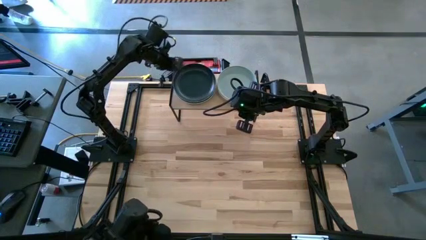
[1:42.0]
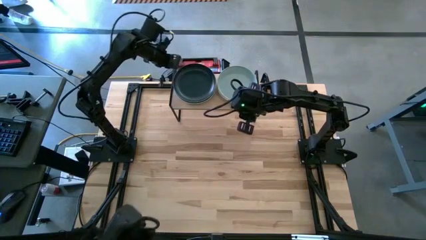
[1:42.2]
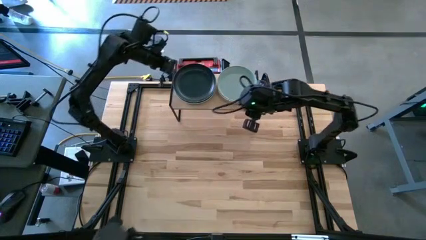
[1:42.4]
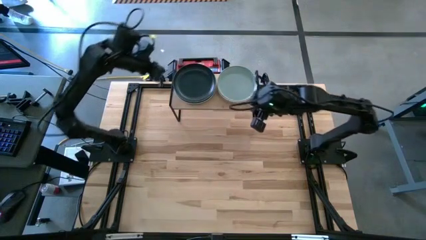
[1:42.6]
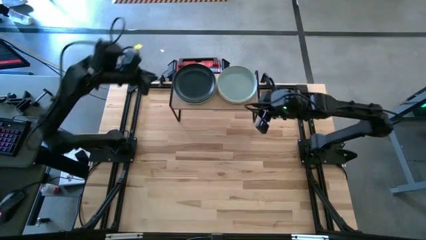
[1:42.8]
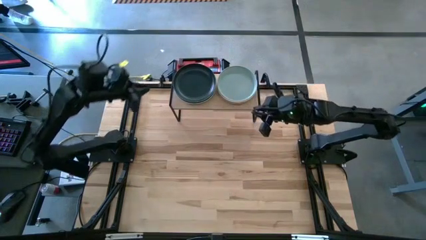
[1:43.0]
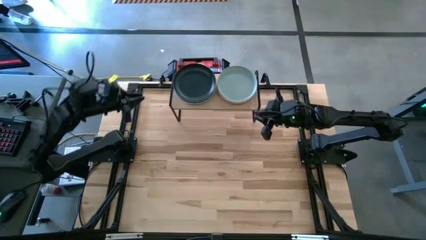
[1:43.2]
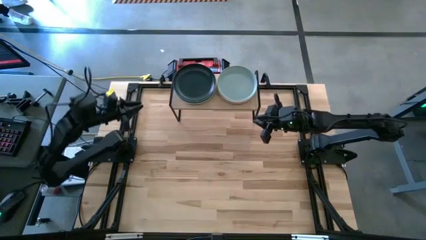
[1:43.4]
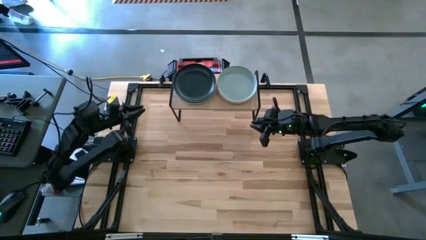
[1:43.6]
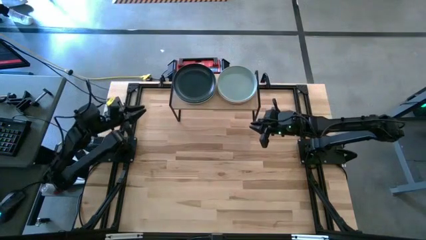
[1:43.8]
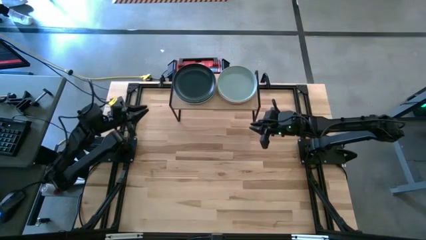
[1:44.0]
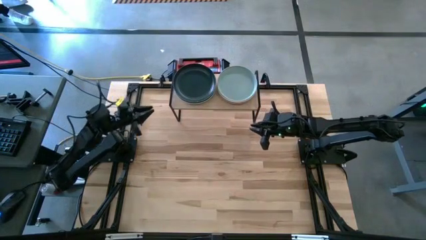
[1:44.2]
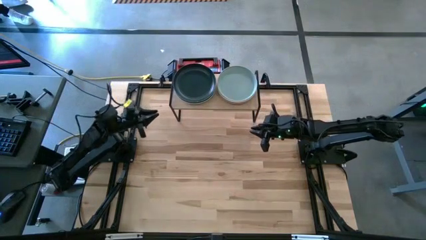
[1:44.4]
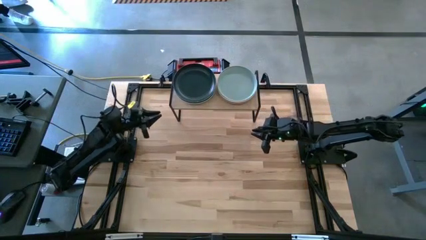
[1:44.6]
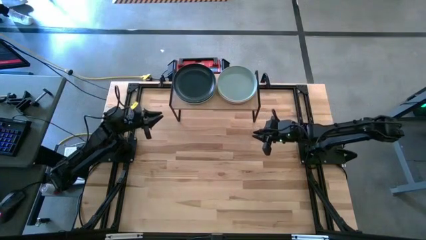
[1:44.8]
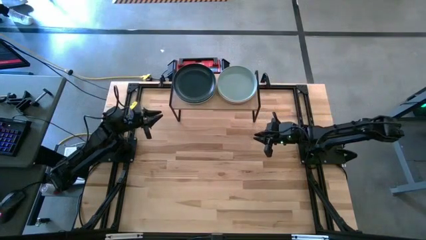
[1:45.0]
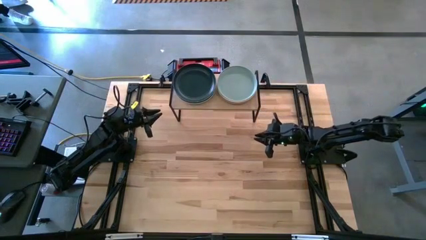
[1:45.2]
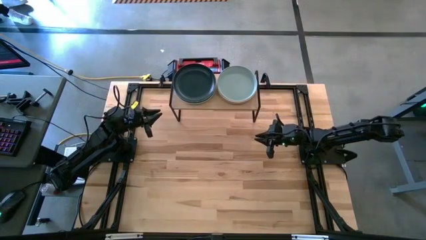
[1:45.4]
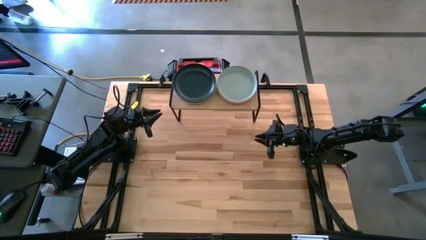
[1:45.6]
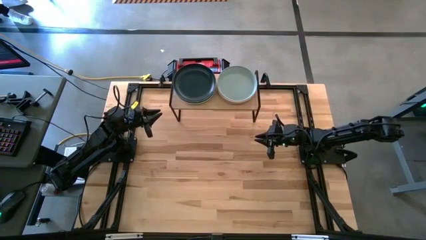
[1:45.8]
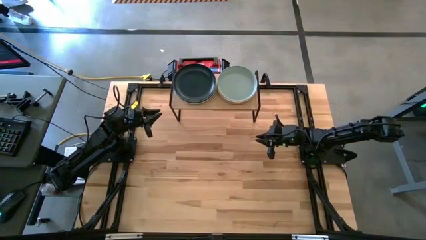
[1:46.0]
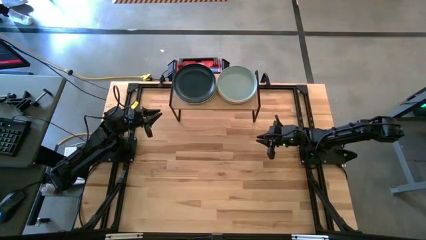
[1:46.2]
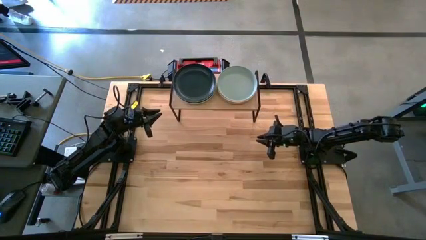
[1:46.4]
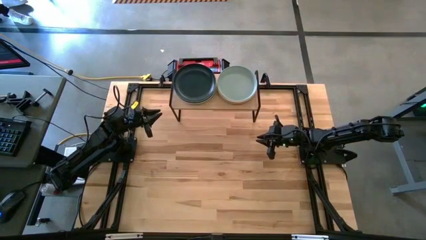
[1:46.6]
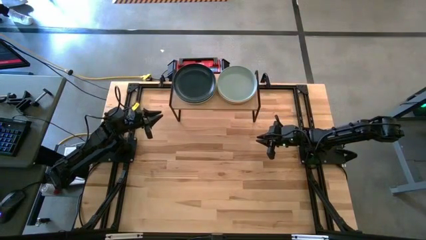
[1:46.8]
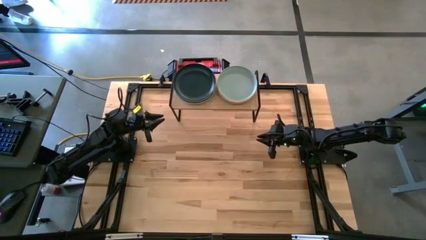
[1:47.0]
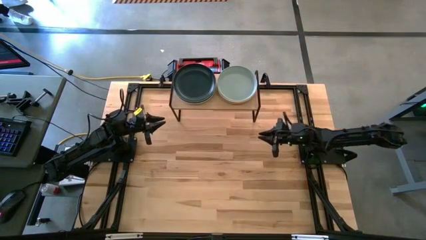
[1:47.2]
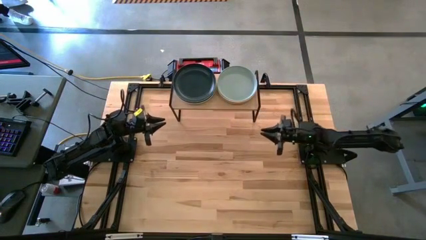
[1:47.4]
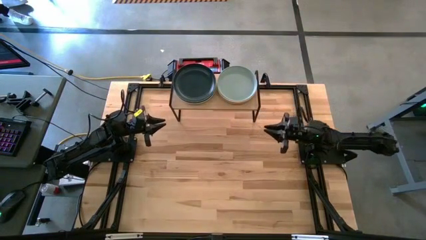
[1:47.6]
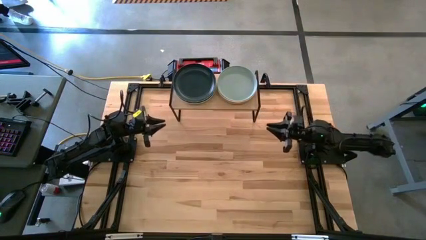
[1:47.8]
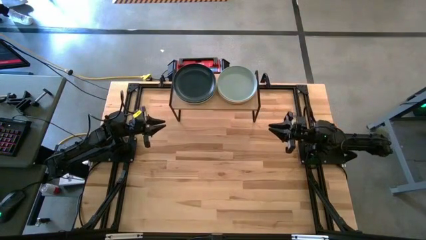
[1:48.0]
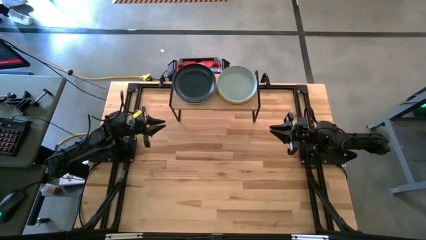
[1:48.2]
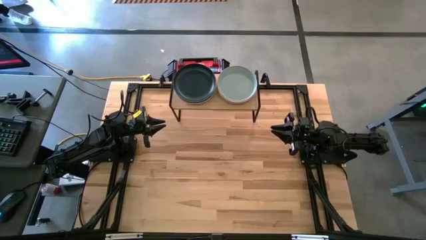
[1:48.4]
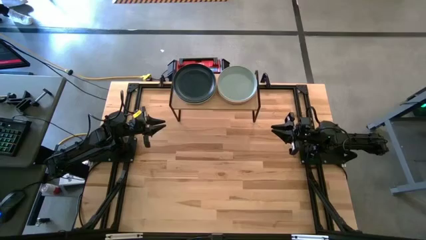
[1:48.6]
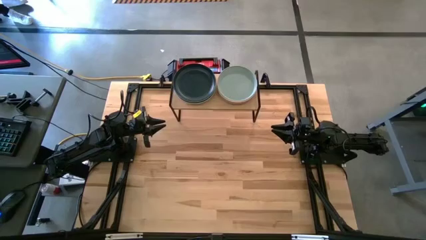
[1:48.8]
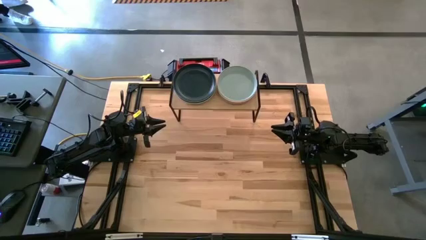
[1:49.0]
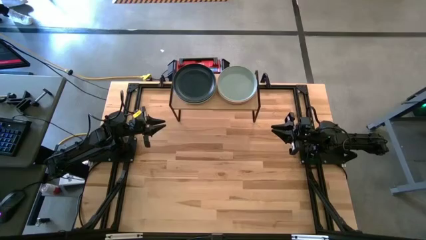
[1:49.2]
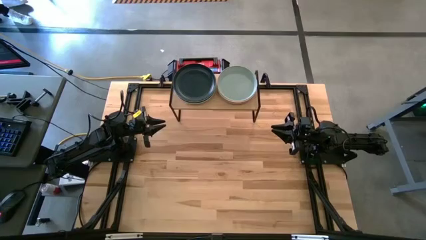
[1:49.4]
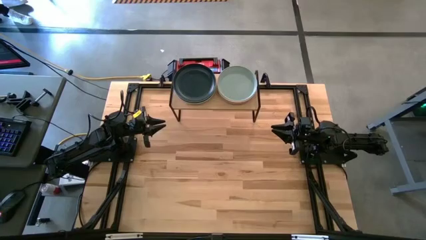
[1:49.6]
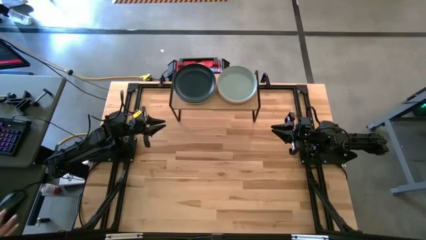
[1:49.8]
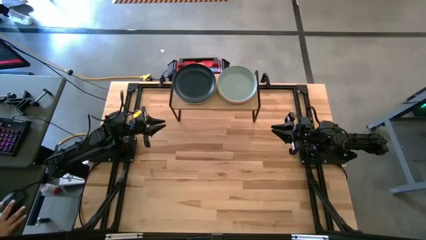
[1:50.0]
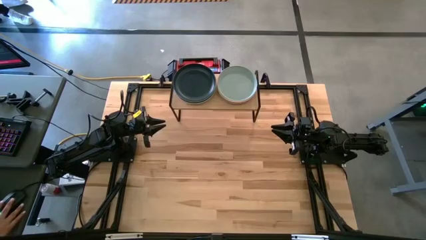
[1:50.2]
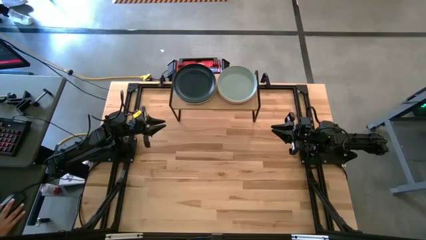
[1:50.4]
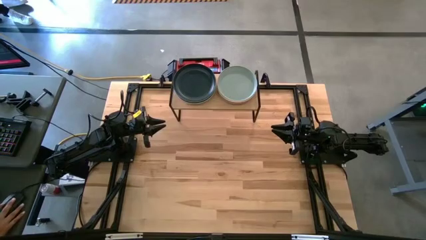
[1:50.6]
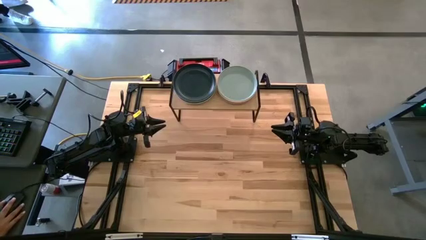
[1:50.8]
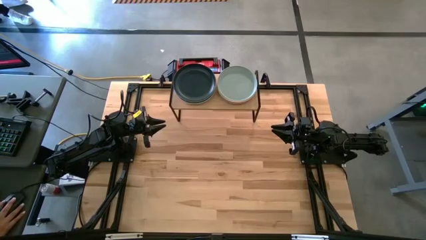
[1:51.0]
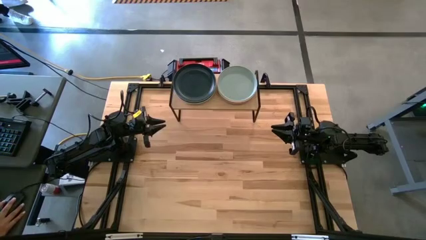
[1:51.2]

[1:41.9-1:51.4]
Task: Place and stack plates onto a shelf
Return to Home Position

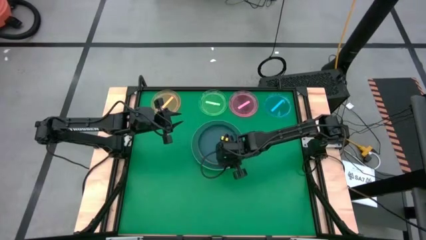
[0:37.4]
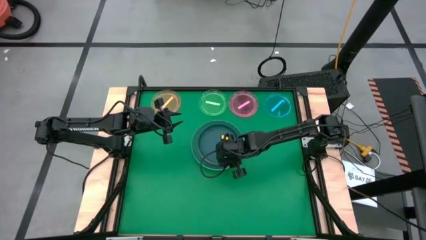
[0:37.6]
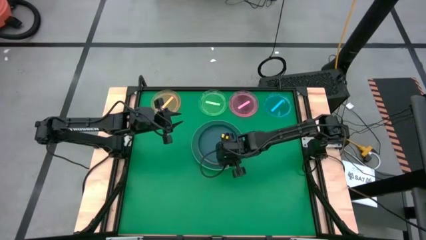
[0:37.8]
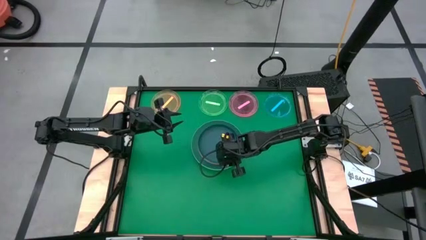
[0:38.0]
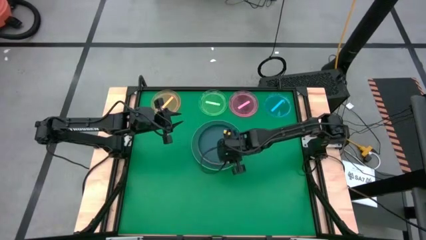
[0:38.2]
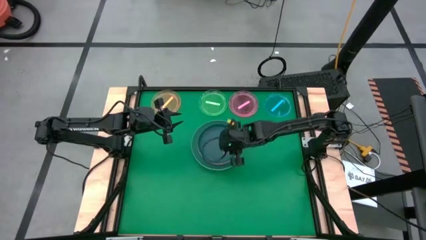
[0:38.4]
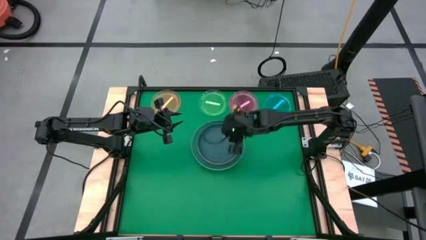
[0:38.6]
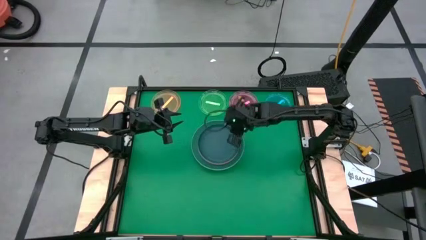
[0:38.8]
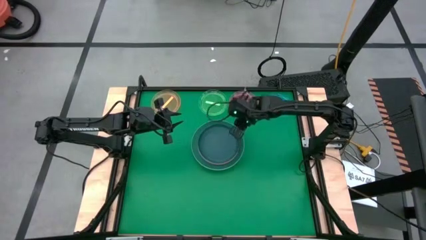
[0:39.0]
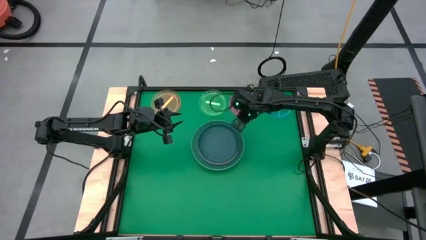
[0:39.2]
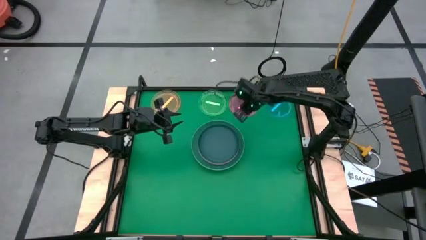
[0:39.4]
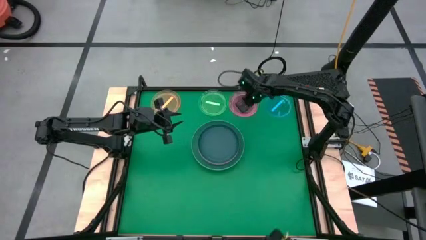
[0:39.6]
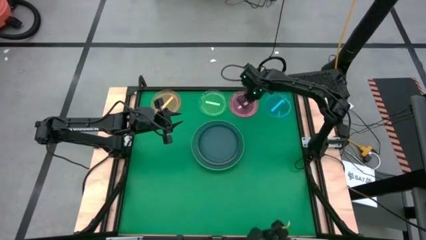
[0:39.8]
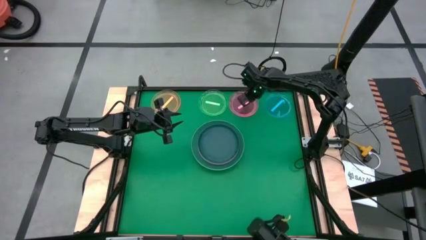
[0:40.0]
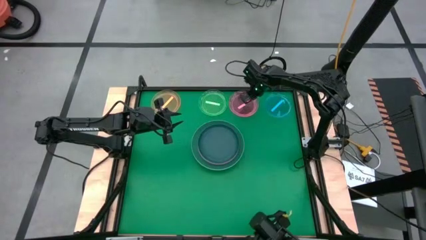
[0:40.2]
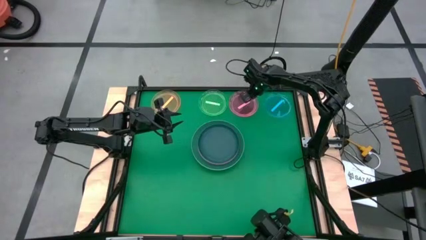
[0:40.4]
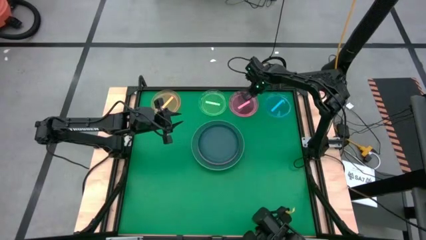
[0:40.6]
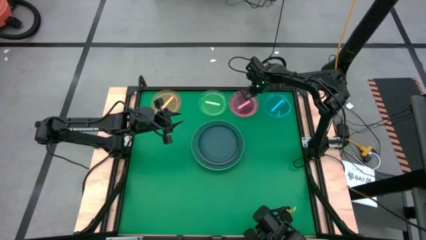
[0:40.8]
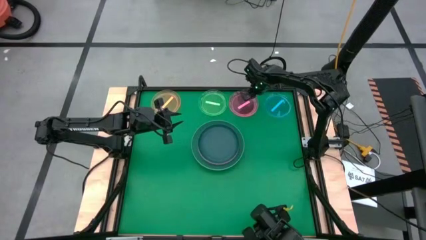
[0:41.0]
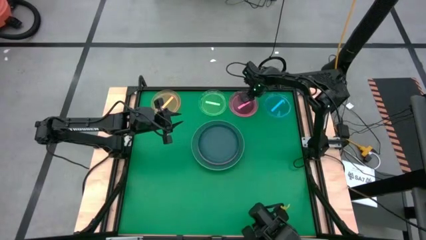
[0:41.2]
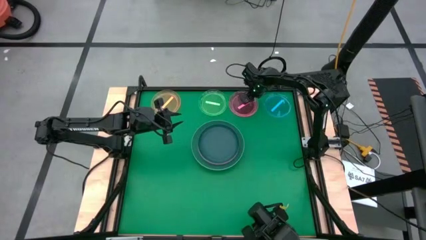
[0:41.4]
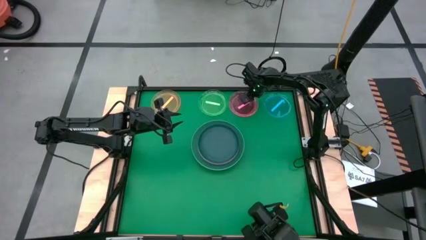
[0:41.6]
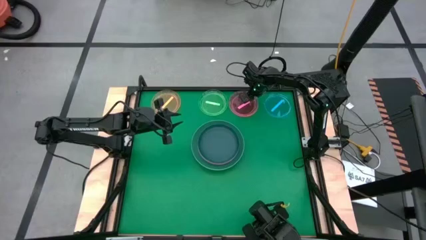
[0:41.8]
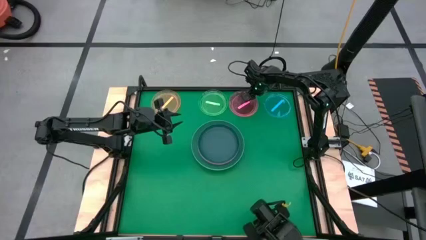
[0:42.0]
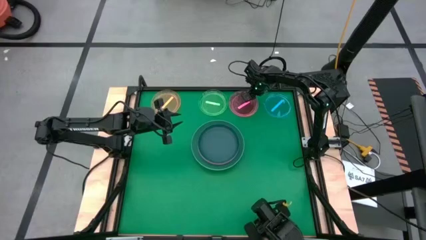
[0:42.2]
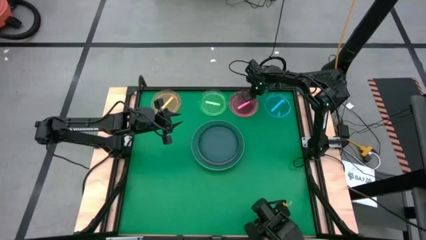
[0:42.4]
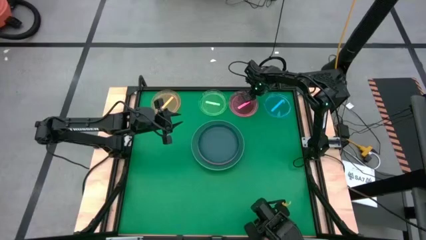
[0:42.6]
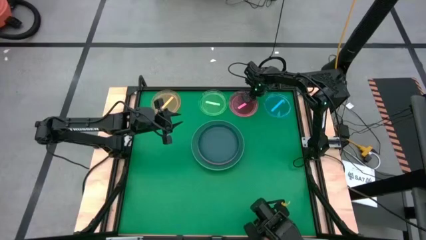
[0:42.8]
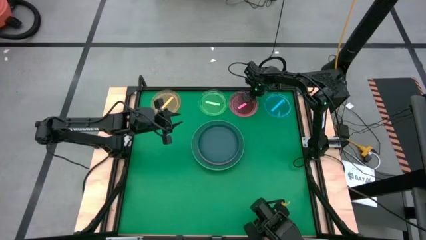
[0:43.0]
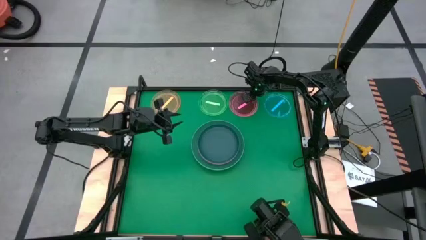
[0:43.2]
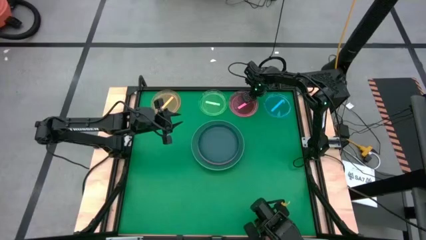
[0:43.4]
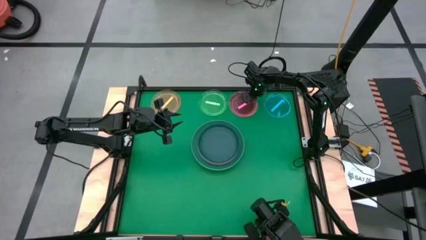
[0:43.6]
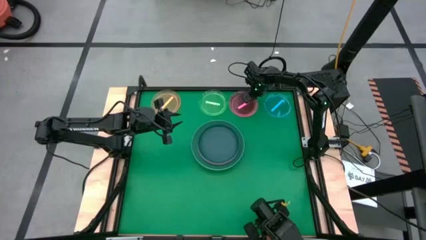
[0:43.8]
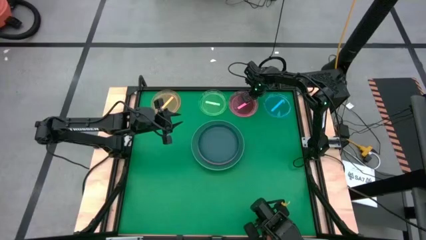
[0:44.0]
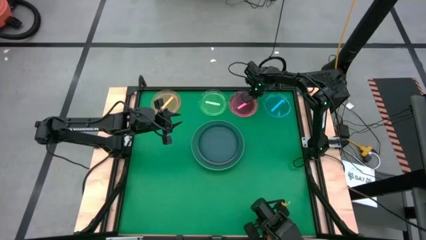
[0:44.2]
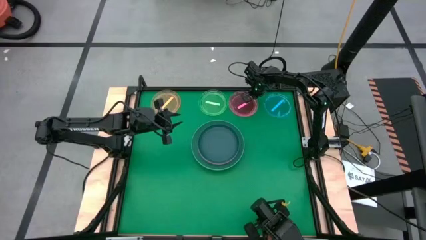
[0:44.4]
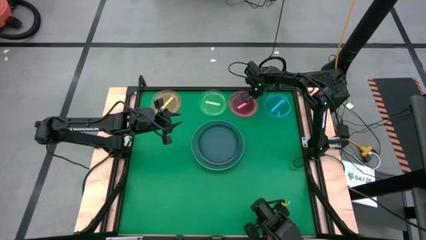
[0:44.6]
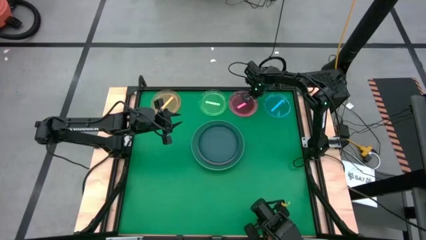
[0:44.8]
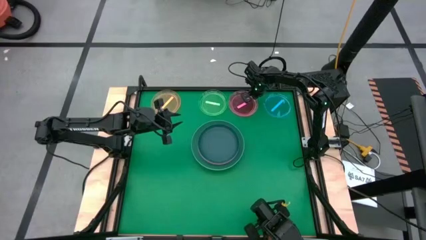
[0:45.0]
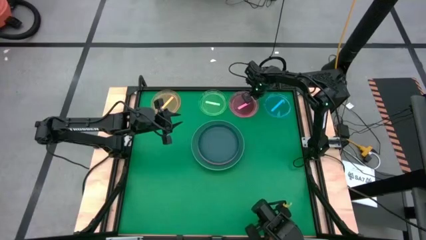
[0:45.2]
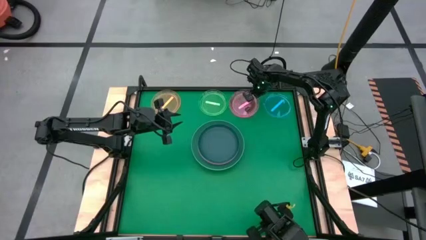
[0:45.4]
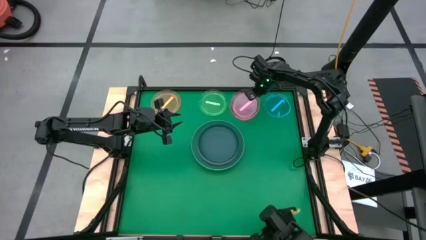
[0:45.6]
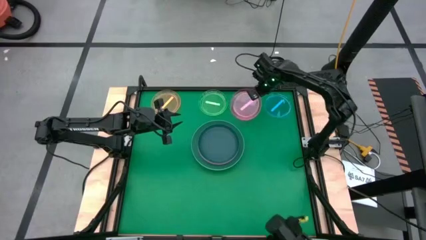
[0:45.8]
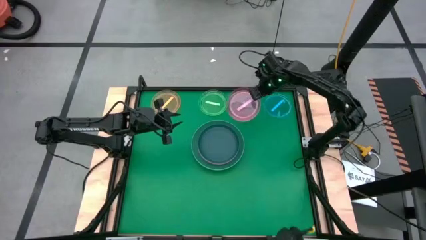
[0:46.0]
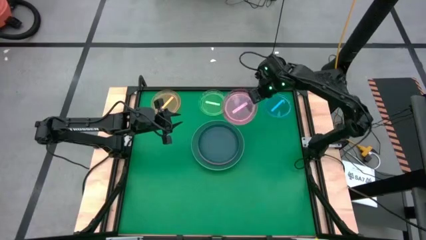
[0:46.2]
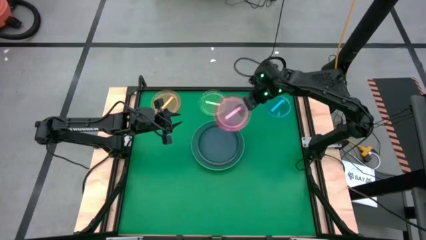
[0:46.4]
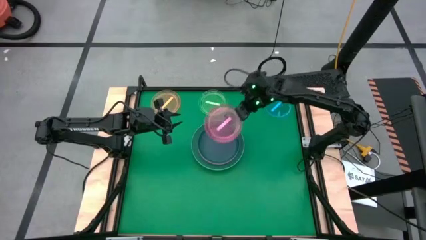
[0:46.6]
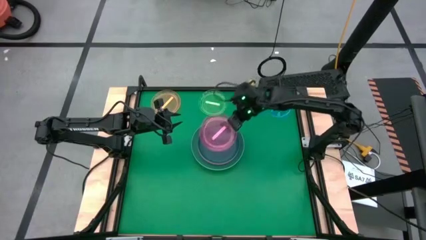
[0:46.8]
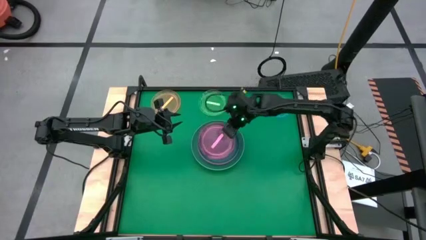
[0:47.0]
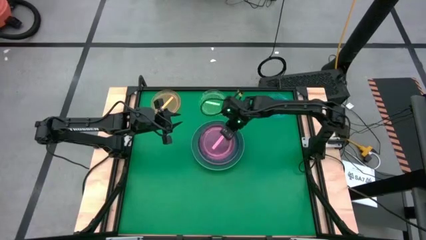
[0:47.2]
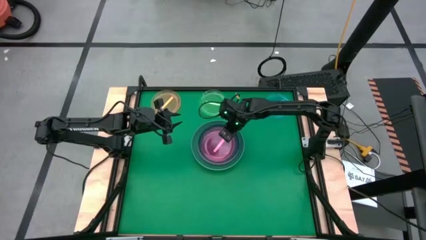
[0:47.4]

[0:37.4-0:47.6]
Task: Stack plastic plates
Stack the light pink plate on top of the dark blue plate
